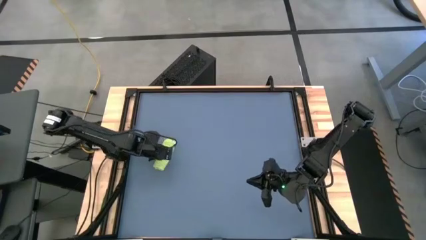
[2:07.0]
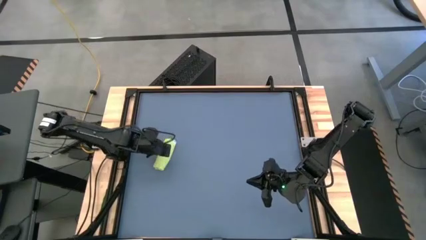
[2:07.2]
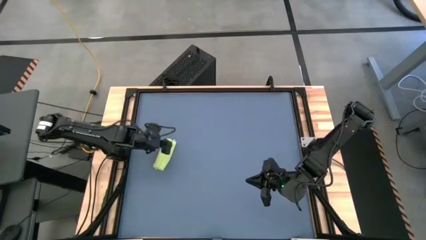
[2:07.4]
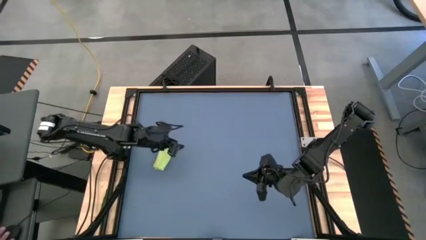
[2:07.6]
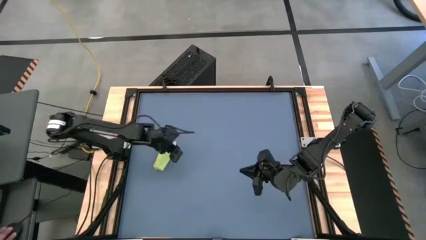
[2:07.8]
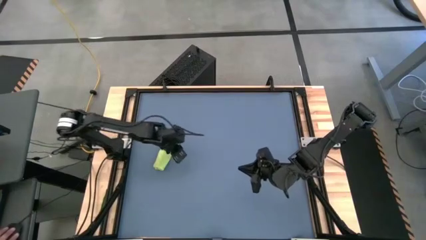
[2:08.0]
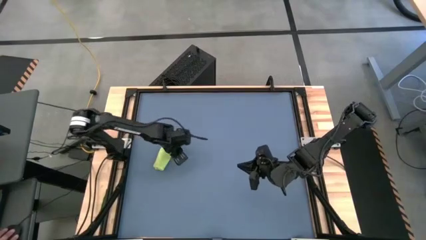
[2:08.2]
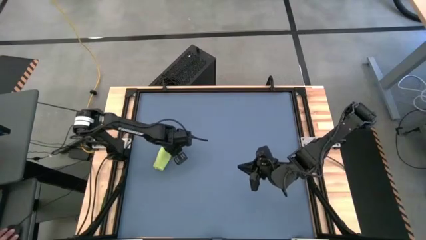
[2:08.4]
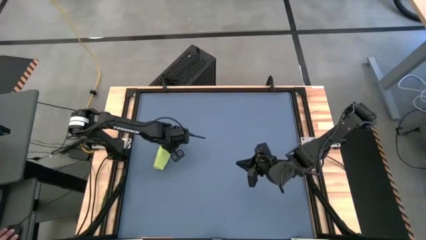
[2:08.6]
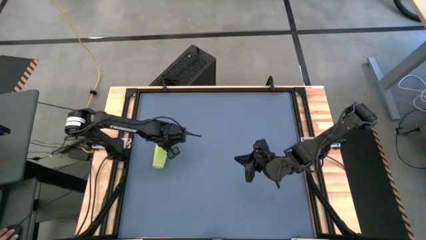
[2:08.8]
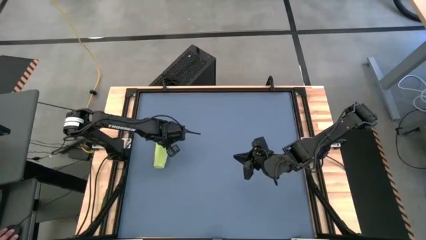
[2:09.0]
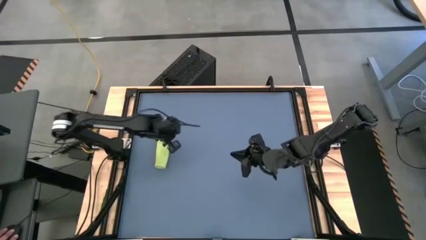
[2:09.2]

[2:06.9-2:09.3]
Task: Roll towel
Return to Home Position

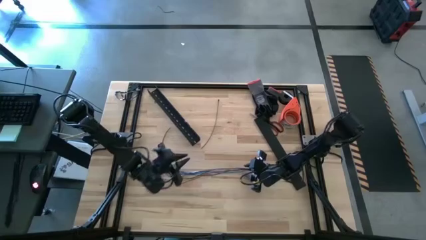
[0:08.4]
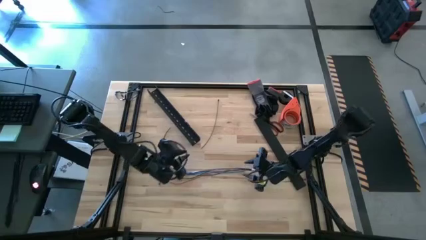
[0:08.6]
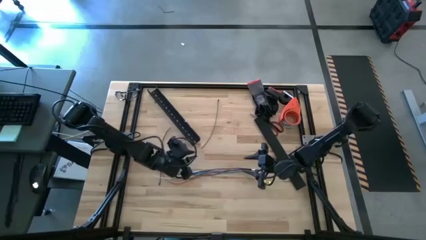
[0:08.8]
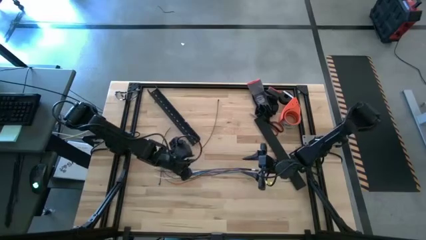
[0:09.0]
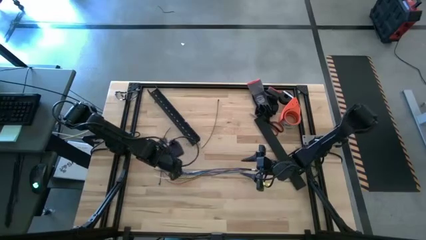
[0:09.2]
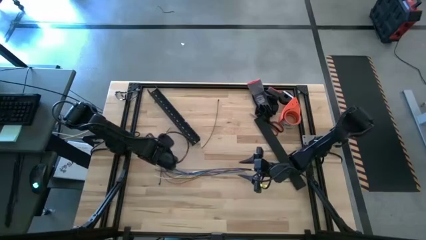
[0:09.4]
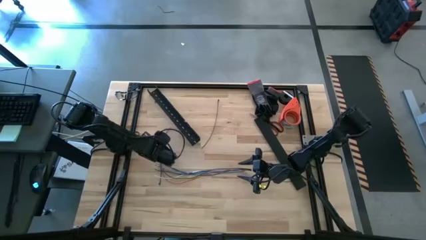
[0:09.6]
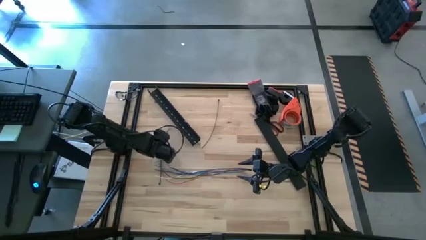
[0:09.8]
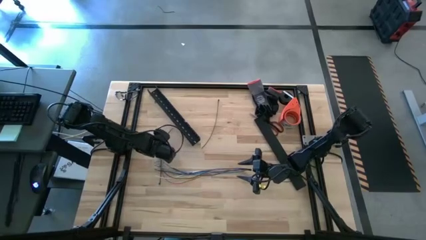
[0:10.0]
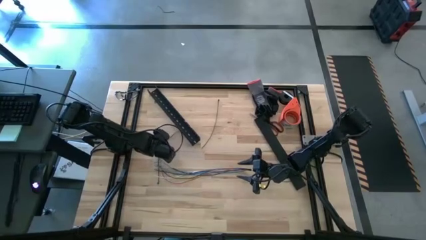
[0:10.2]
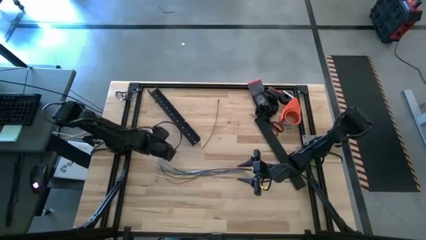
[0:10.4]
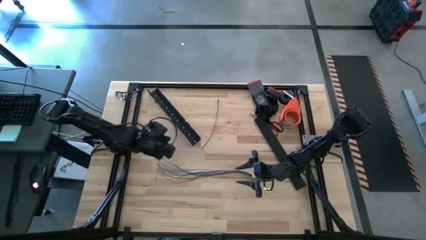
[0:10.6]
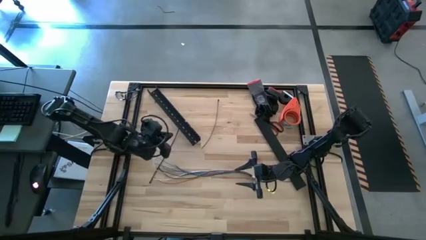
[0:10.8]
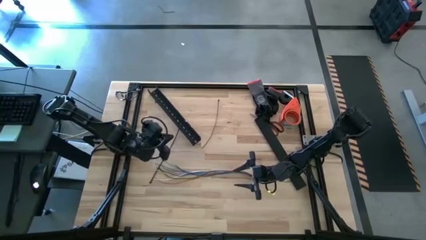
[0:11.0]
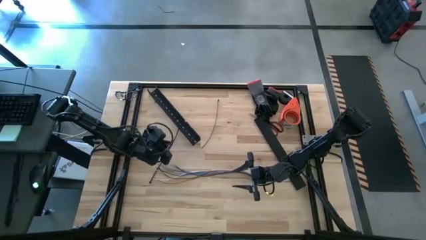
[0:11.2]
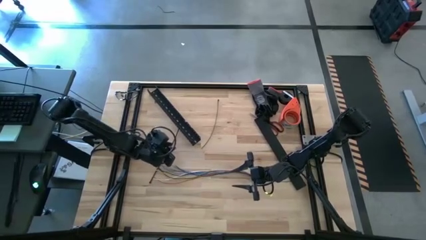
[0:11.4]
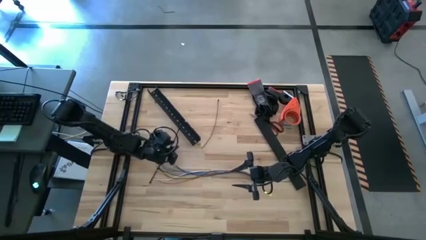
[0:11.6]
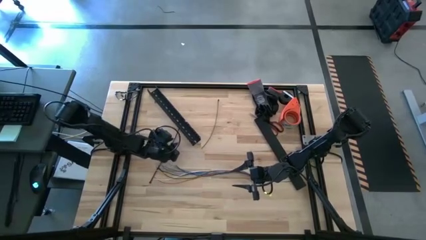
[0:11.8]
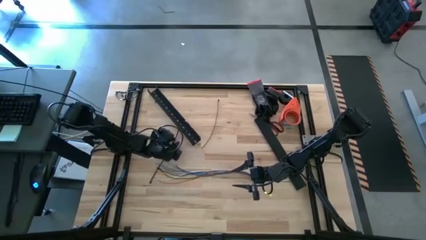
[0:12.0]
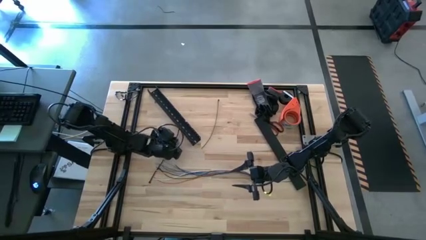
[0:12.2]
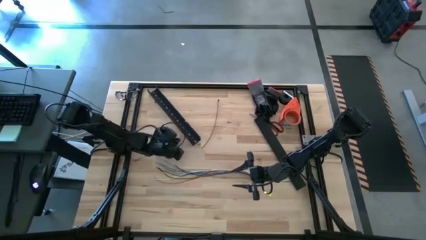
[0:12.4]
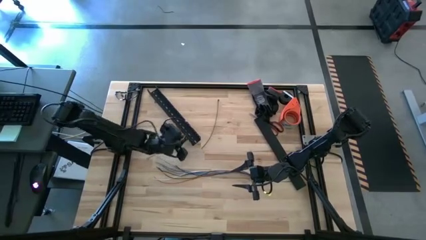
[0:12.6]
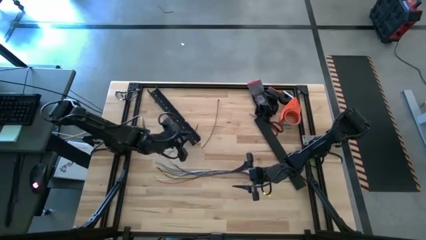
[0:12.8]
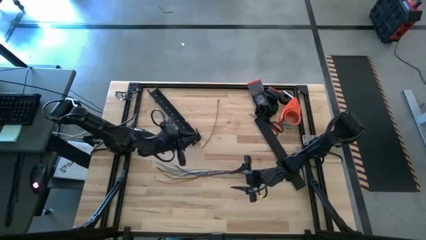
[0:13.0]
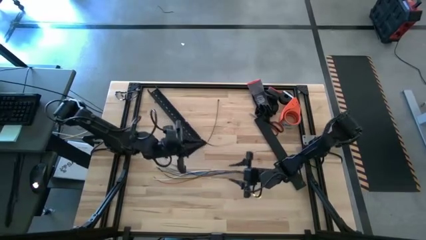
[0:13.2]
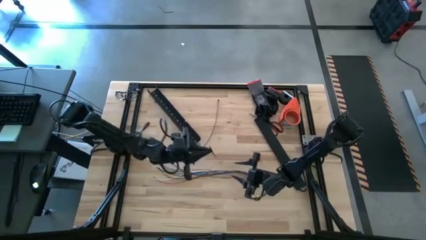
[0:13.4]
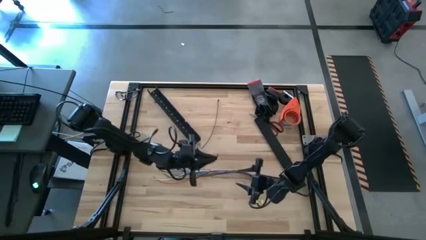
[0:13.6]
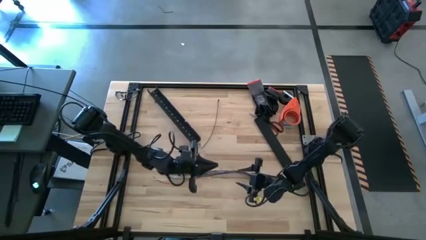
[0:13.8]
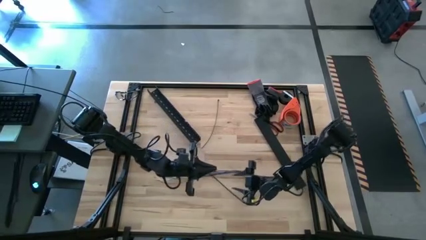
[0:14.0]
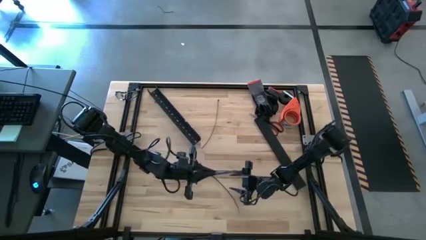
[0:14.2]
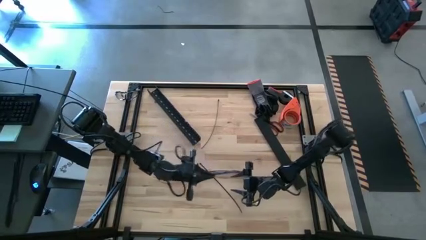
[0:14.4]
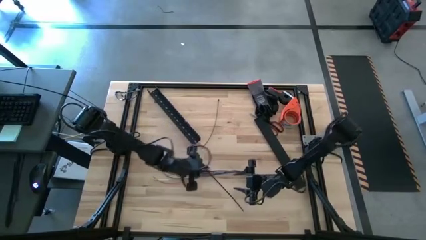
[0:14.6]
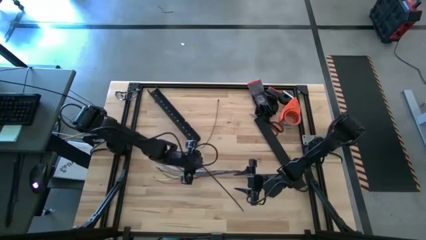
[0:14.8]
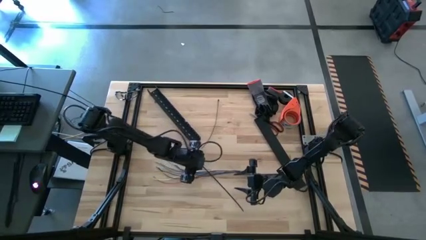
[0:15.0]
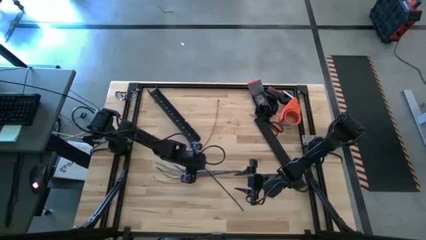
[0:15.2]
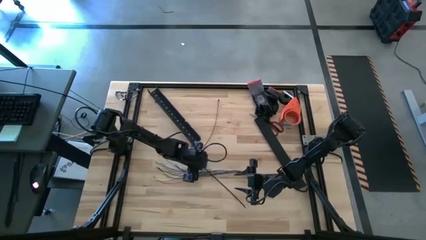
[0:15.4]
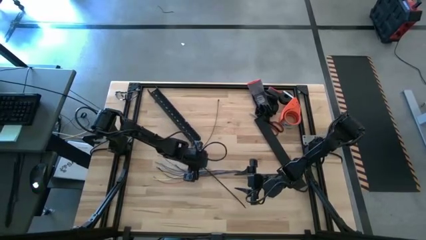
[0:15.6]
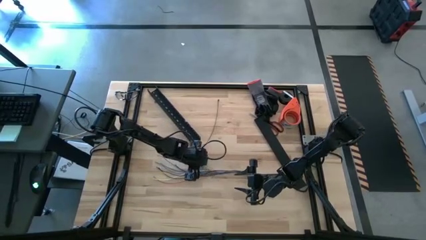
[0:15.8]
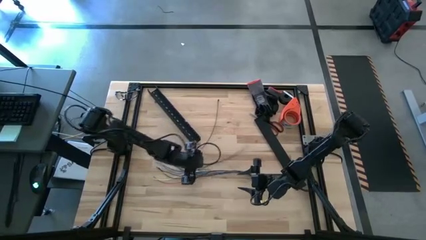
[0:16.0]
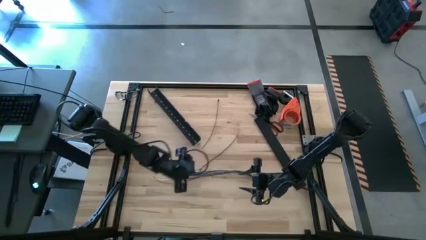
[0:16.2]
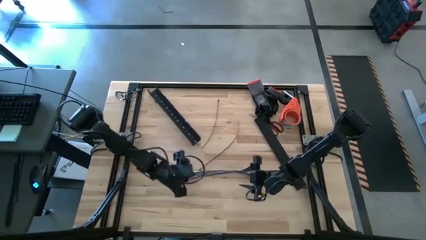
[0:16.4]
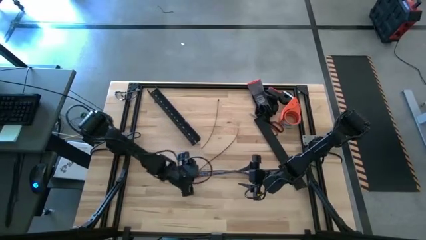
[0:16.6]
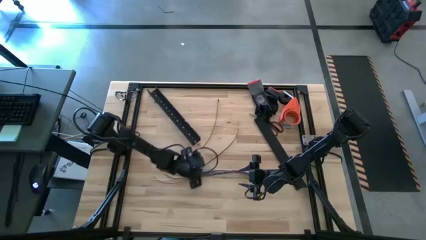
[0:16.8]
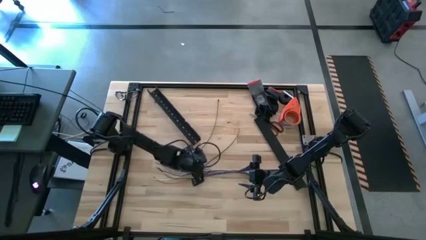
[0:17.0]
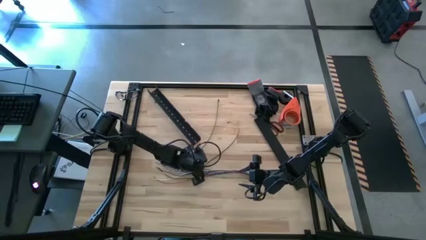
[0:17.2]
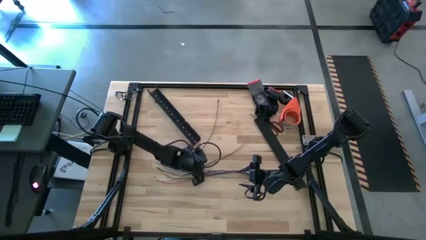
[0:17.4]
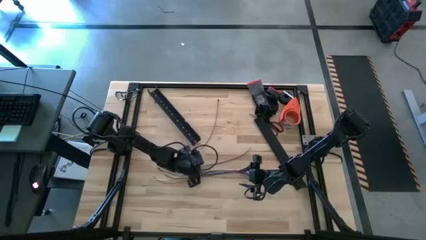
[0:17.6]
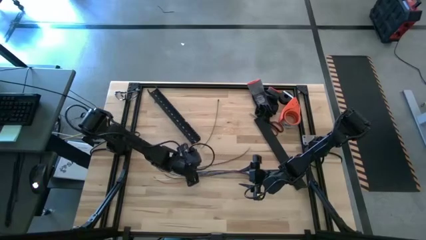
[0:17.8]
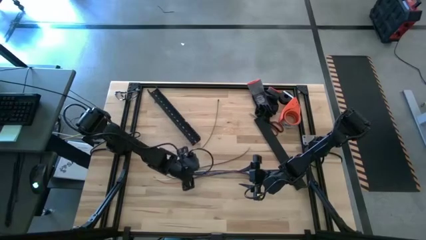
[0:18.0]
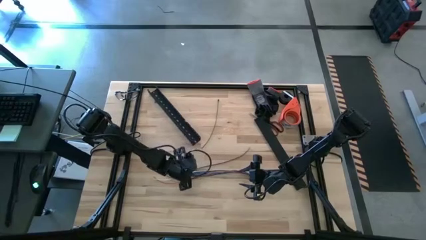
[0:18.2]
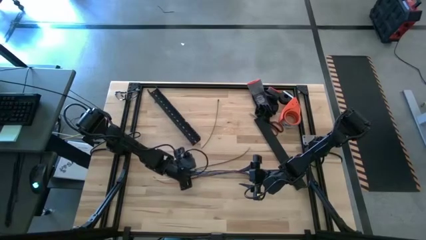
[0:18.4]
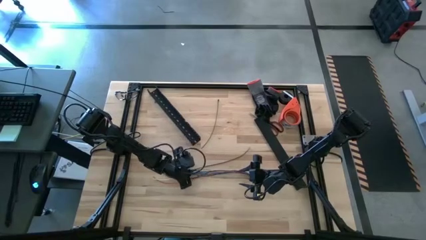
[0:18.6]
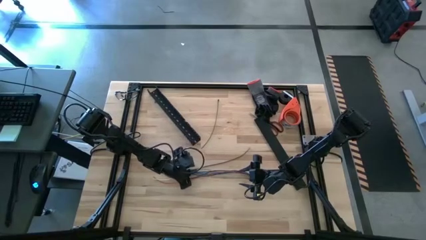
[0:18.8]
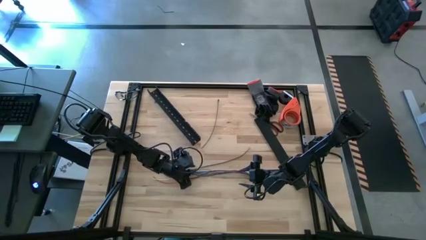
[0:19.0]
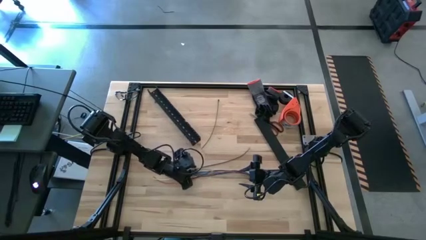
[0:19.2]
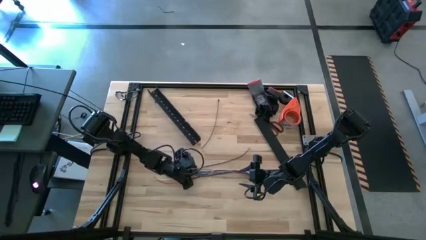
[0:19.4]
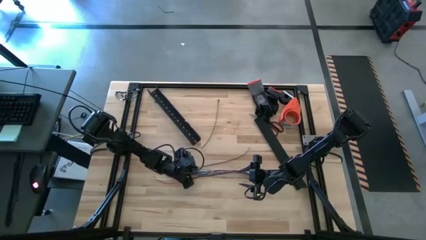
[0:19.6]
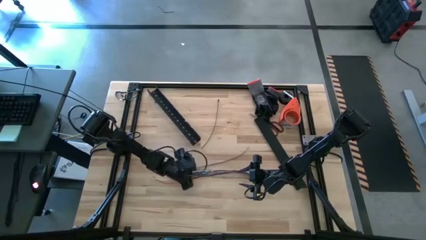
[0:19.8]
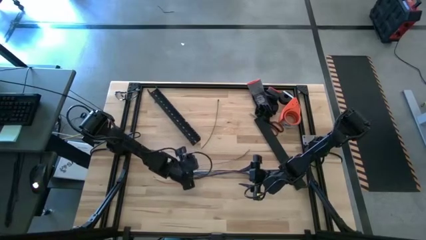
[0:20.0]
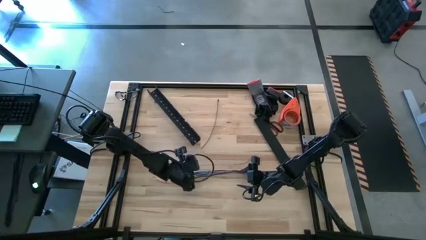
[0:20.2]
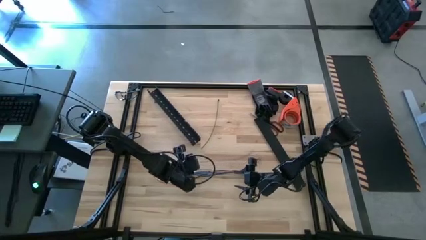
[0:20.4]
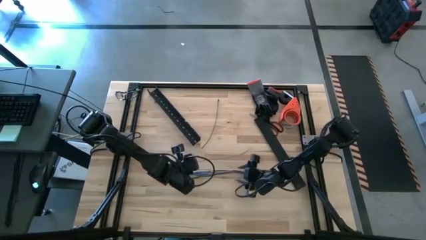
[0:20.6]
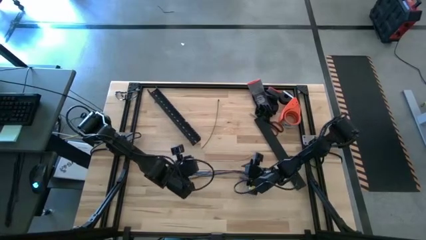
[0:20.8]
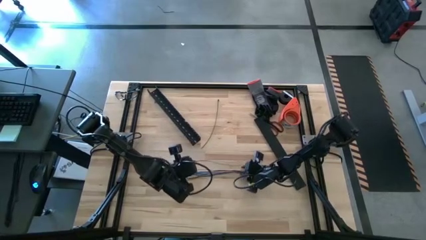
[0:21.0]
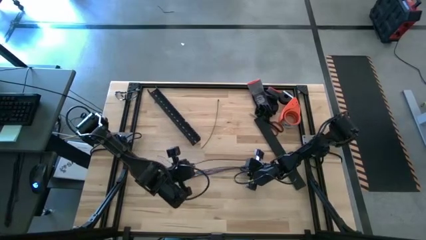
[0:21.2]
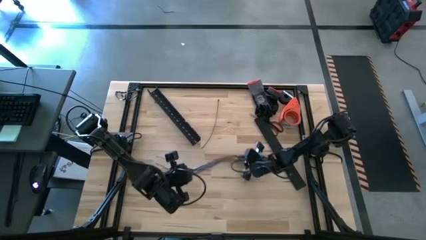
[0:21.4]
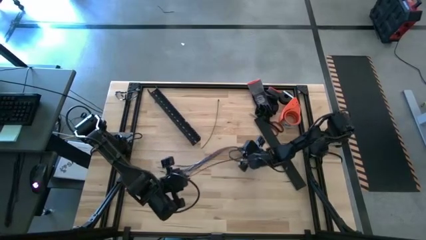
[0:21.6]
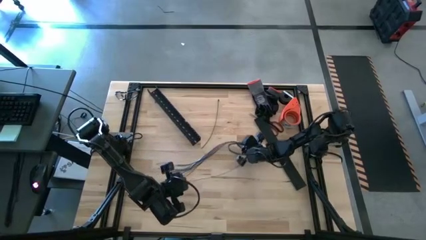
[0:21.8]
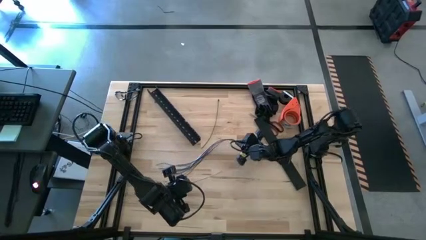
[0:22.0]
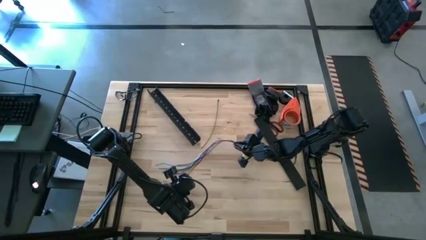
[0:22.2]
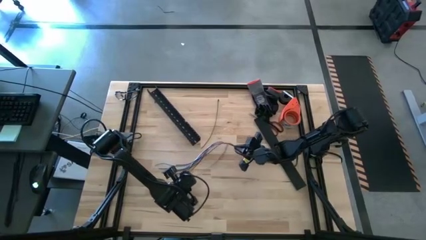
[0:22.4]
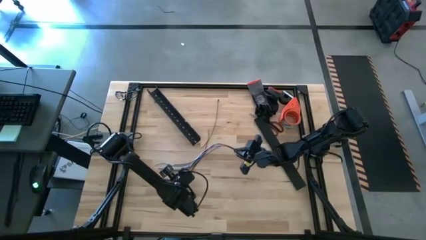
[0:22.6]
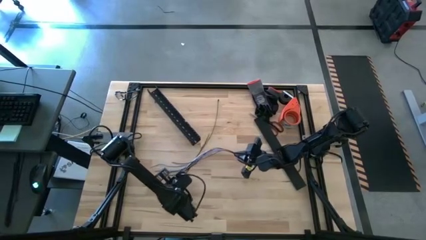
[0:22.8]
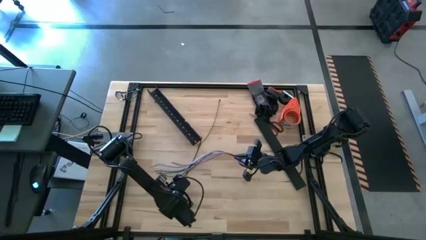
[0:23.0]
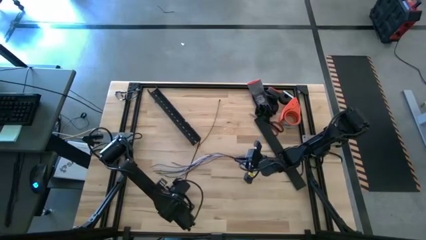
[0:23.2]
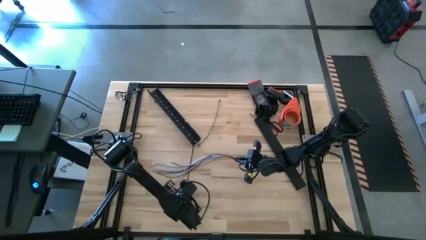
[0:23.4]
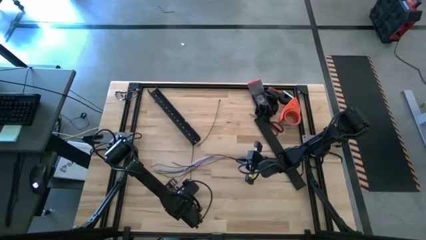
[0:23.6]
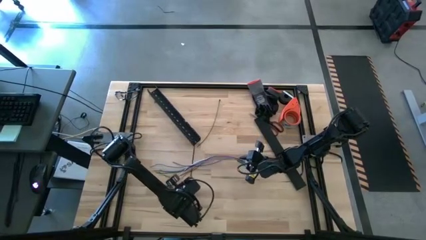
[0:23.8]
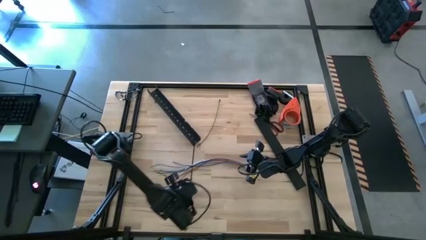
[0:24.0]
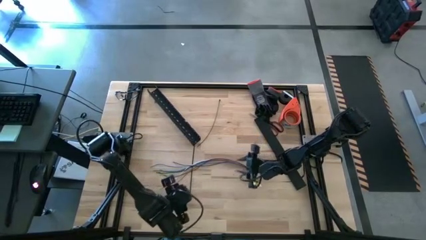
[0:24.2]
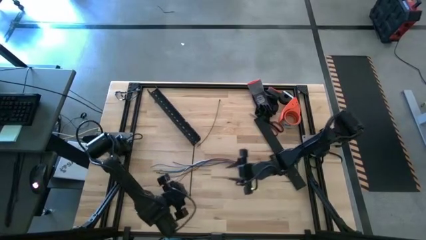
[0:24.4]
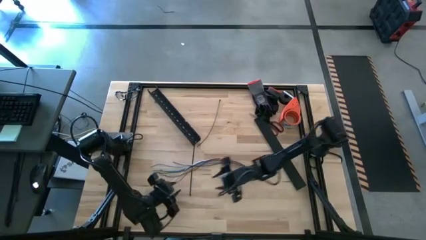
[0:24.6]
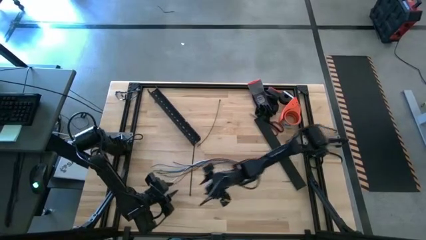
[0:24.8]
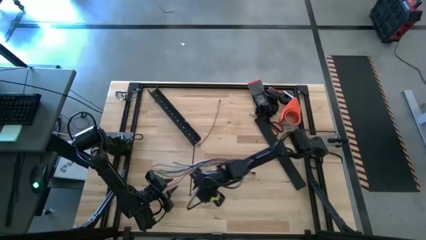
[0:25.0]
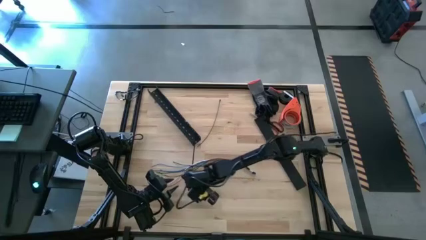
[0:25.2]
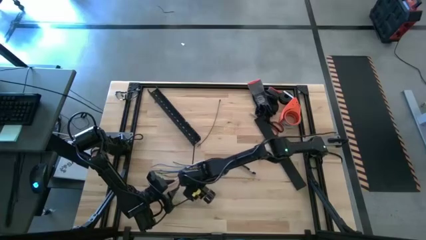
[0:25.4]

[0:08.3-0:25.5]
Task: Ziptie cables
Wrap the cable wires with the black zip tie
